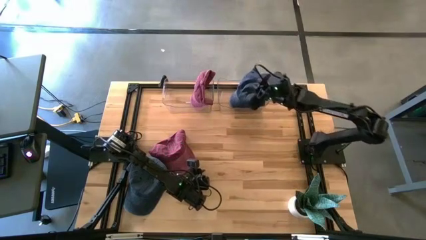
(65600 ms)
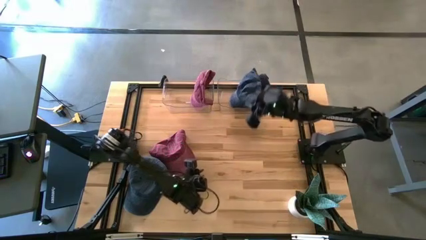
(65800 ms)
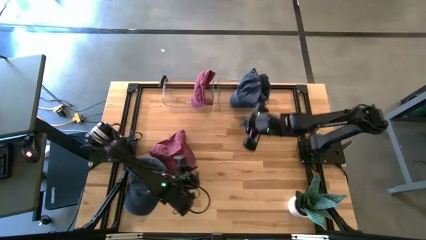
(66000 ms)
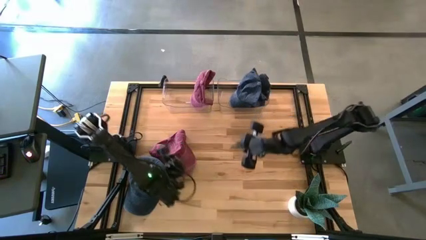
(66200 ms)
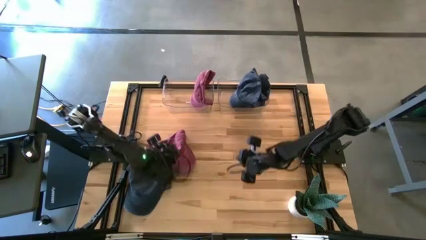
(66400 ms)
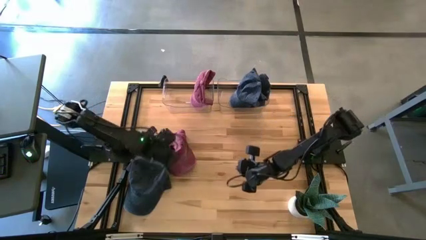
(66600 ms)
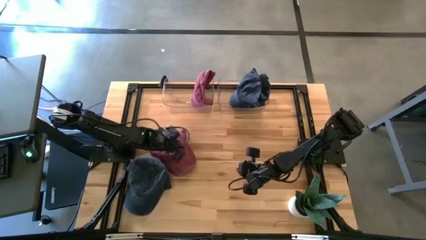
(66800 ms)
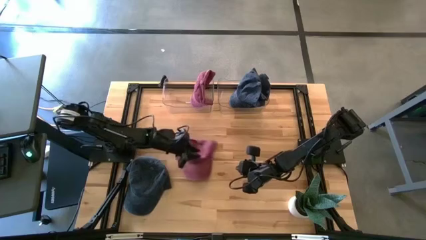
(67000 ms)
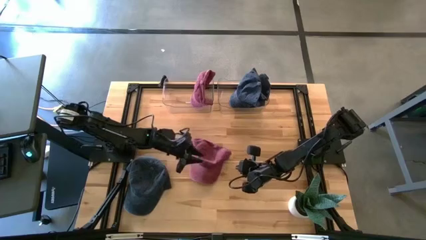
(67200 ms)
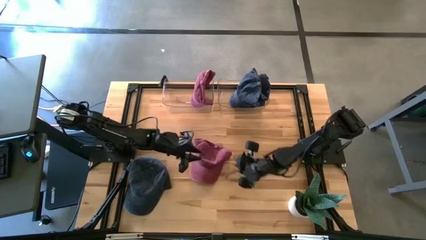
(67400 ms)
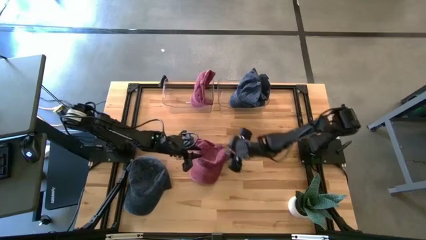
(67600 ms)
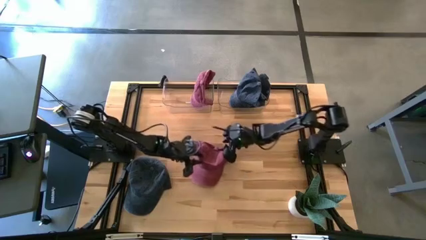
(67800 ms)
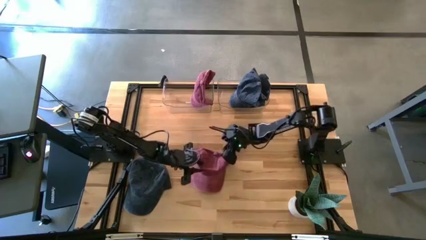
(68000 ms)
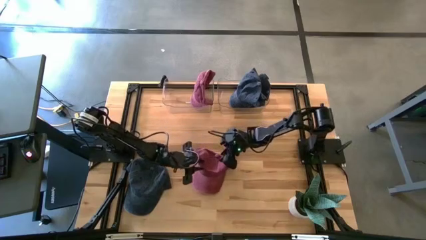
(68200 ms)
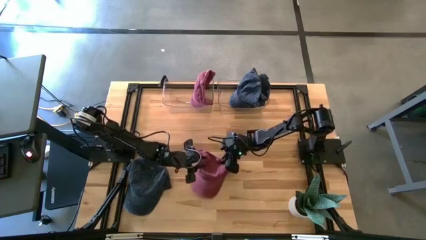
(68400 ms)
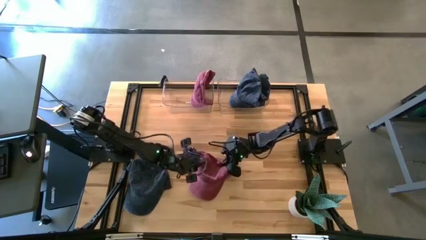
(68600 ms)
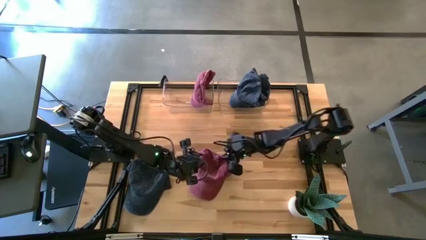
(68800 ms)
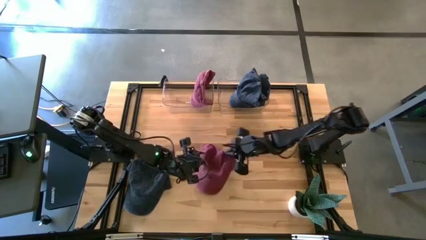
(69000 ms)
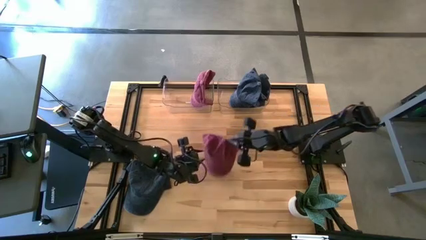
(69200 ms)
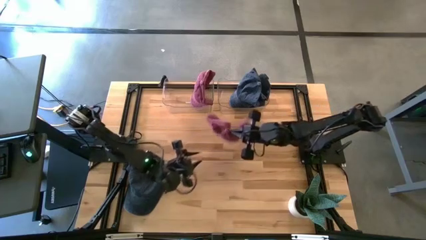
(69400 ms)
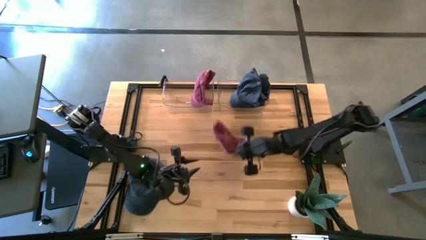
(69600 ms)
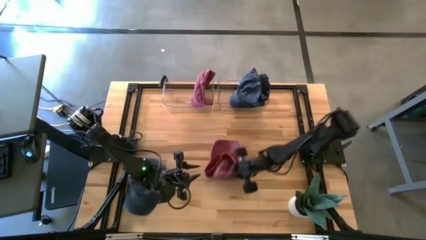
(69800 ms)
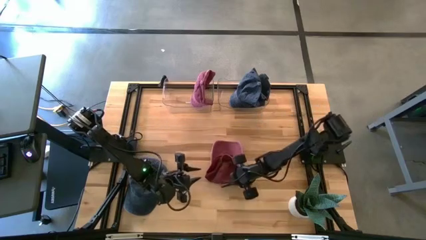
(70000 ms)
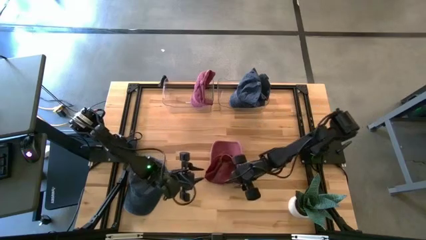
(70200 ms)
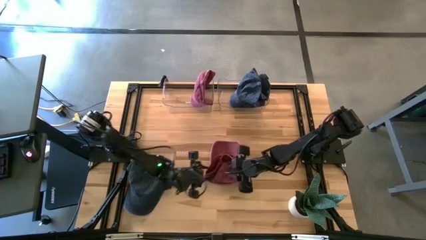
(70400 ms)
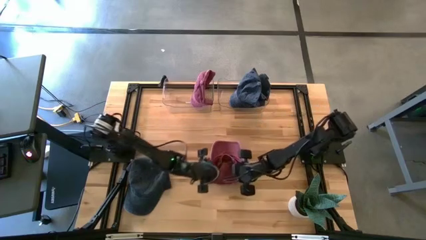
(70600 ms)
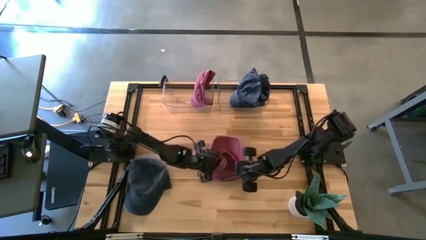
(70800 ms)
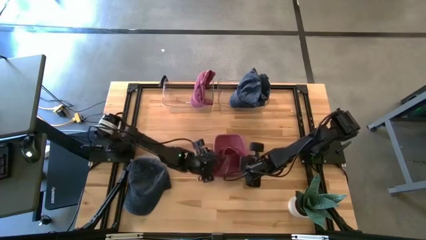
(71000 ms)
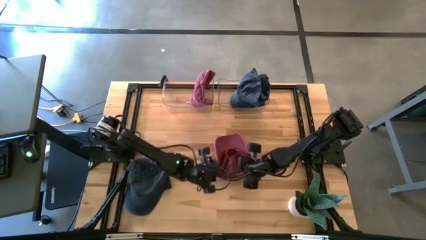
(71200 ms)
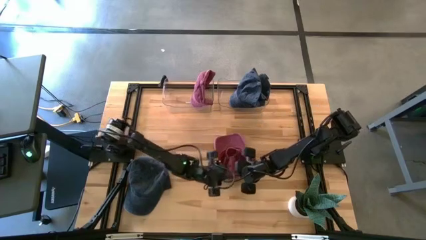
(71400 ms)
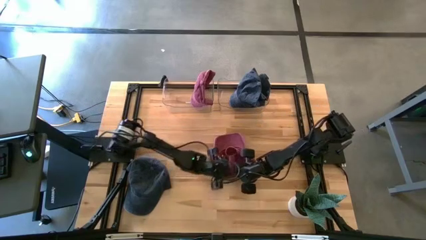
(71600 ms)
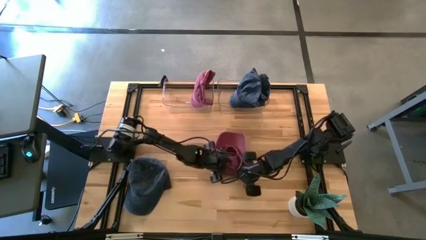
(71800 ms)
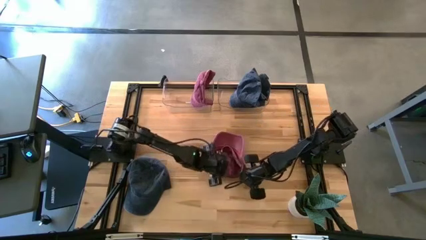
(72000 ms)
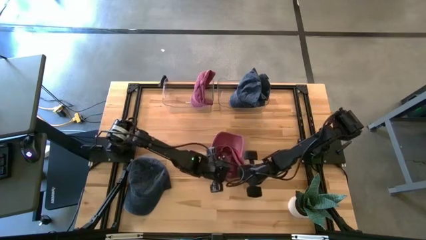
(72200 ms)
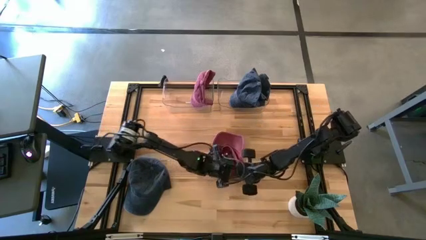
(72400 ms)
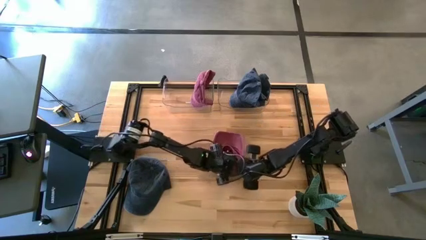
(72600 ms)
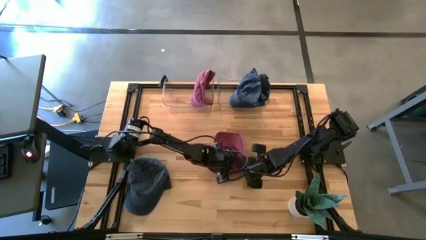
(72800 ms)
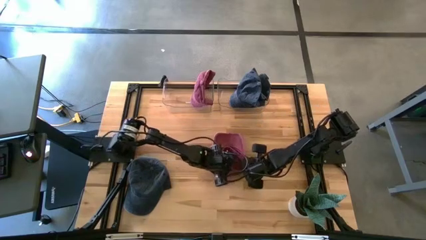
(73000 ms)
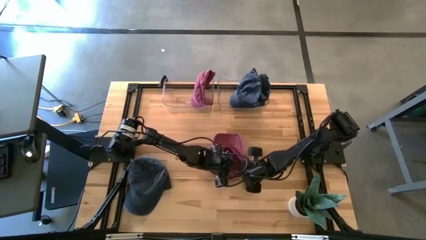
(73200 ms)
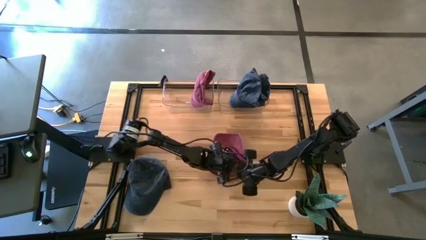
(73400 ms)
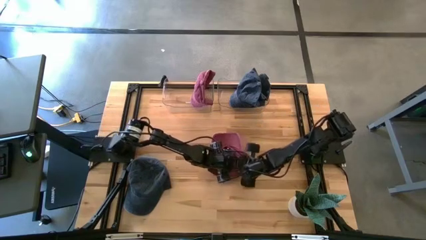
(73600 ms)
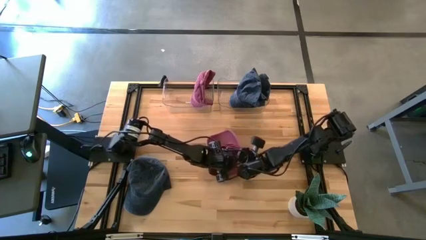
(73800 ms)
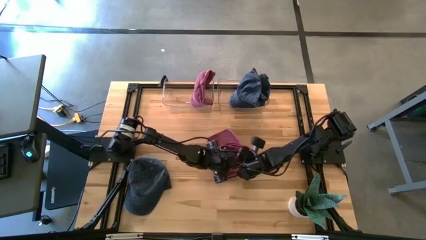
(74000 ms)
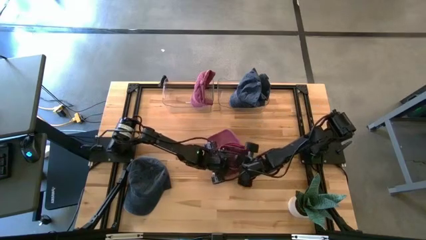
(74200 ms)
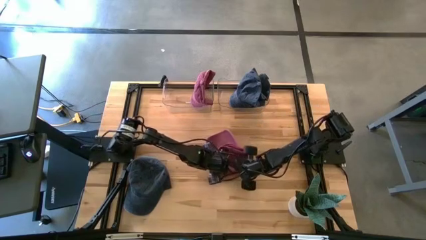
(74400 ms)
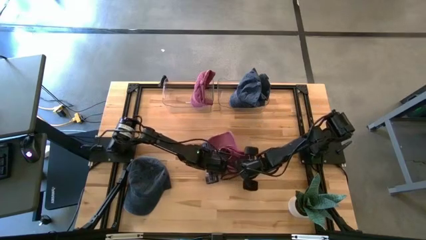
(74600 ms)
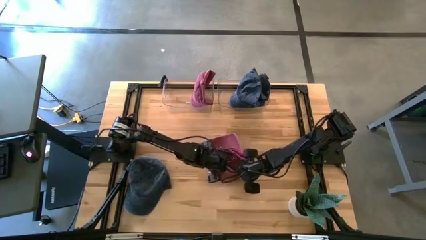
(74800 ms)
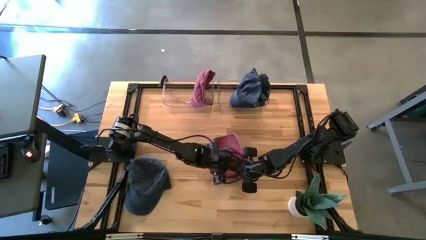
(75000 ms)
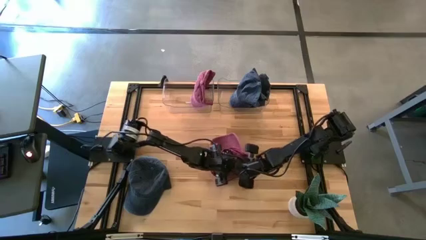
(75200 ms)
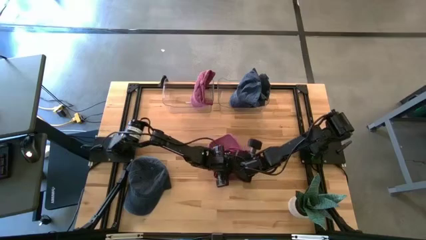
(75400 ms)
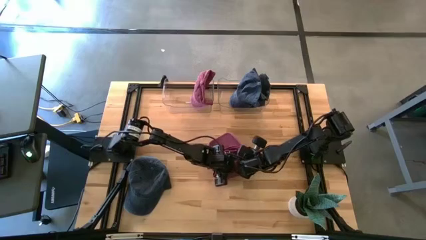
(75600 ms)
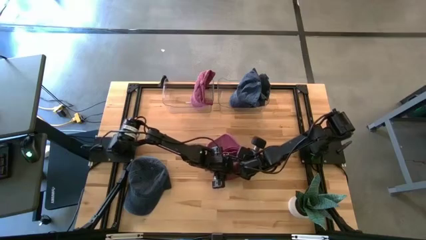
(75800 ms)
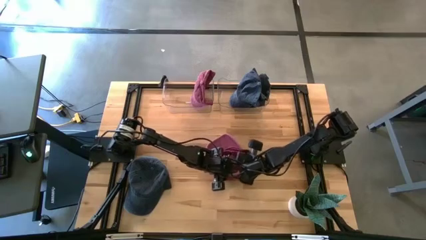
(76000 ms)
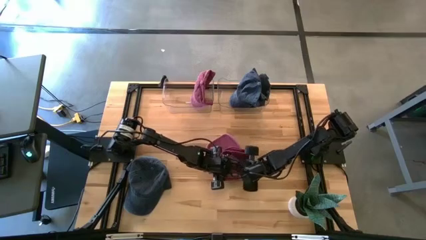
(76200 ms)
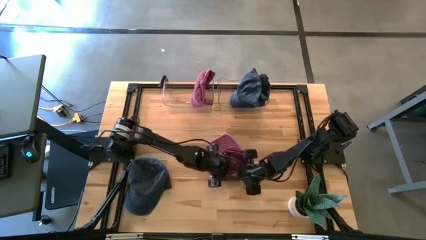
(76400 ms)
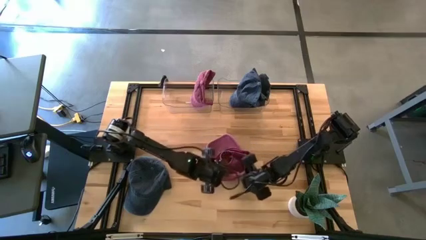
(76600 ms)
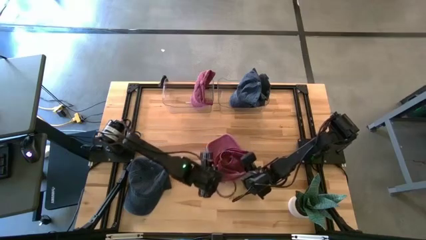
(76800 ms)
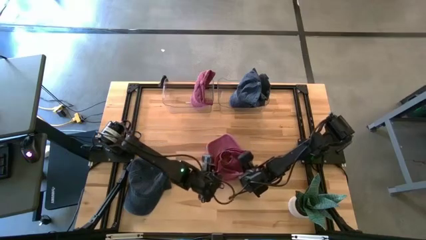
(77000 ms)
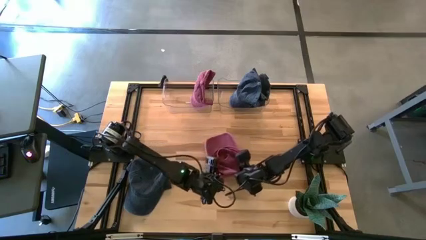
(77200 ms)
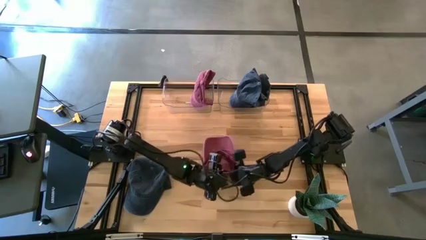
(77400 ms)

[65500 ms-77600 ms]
Task: Pick & Place hat
Put the red cap into the left transparent bin

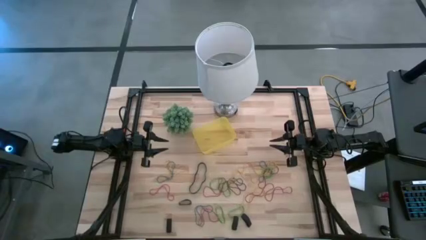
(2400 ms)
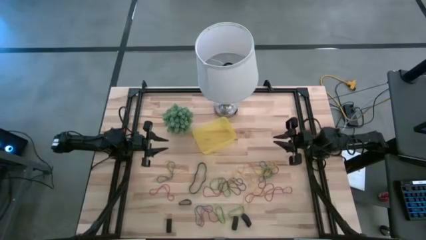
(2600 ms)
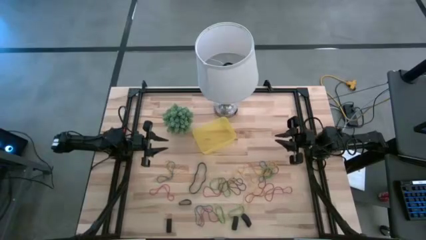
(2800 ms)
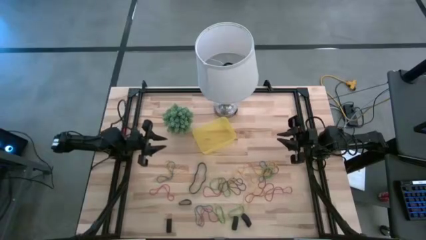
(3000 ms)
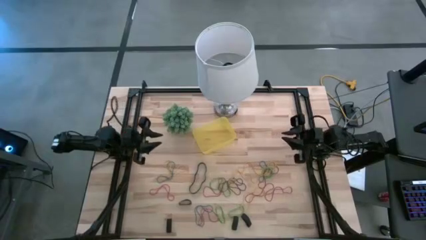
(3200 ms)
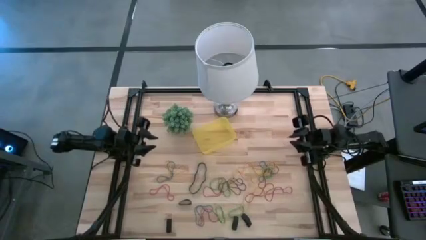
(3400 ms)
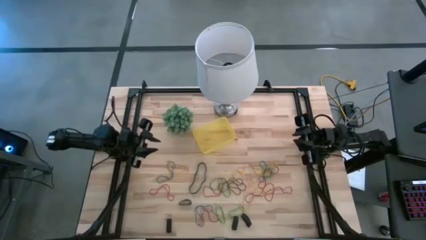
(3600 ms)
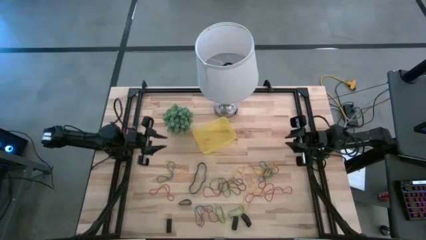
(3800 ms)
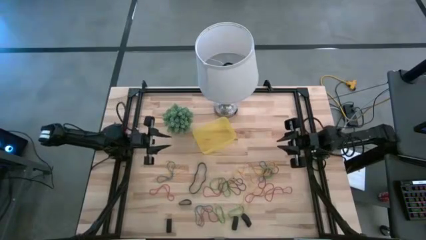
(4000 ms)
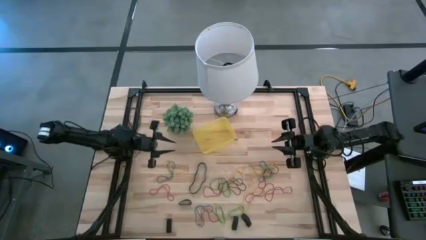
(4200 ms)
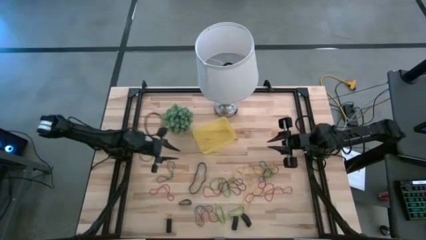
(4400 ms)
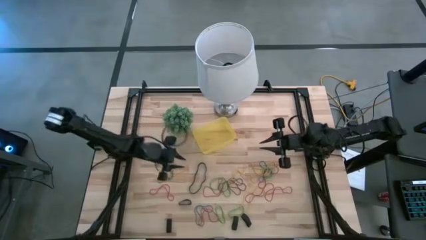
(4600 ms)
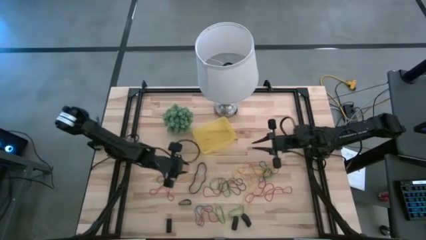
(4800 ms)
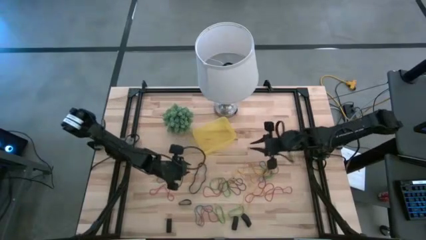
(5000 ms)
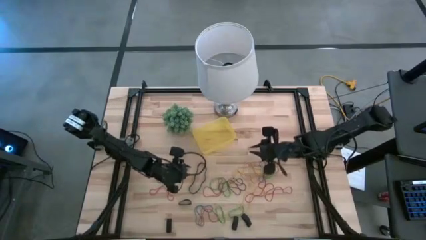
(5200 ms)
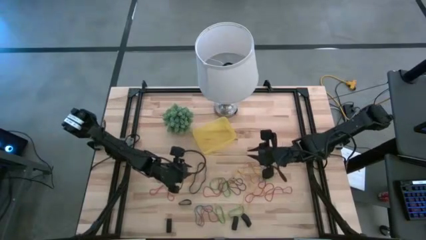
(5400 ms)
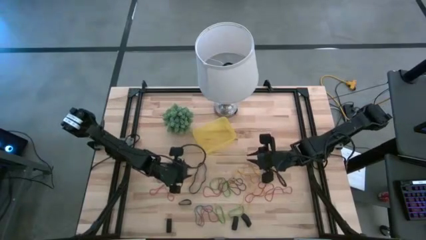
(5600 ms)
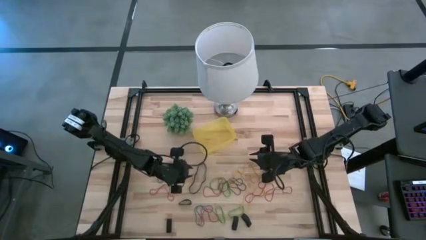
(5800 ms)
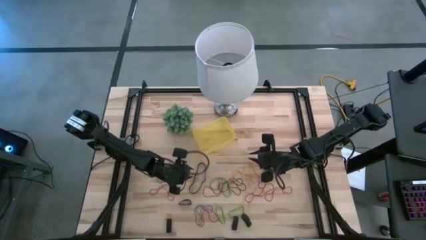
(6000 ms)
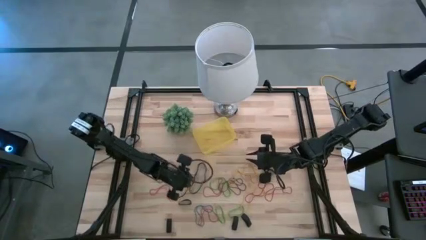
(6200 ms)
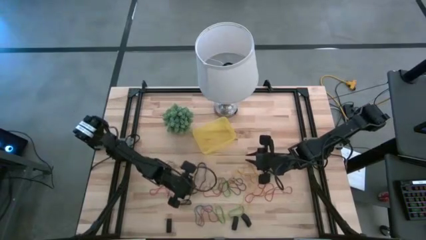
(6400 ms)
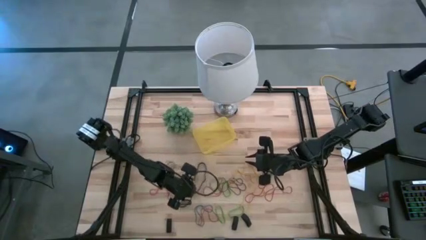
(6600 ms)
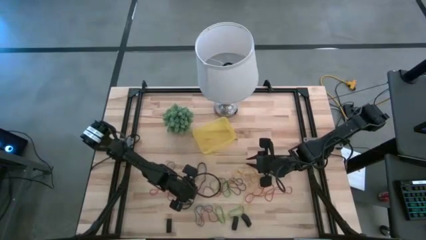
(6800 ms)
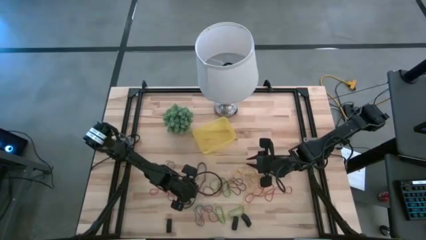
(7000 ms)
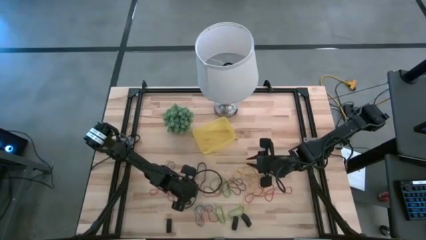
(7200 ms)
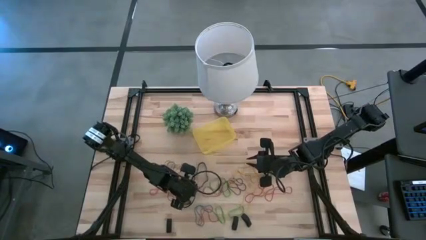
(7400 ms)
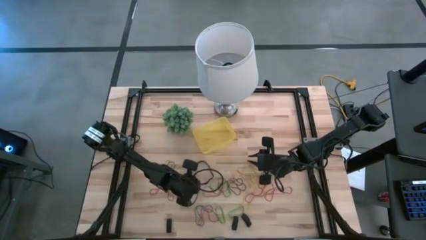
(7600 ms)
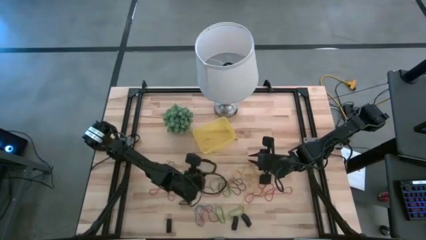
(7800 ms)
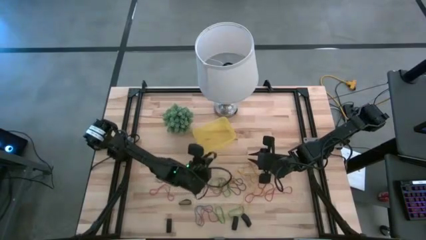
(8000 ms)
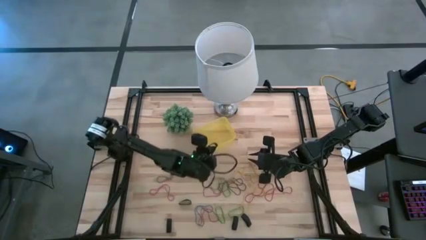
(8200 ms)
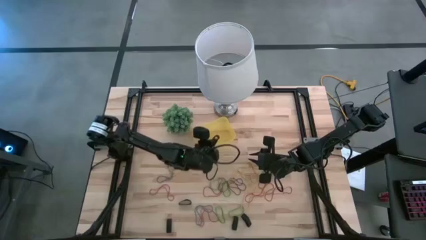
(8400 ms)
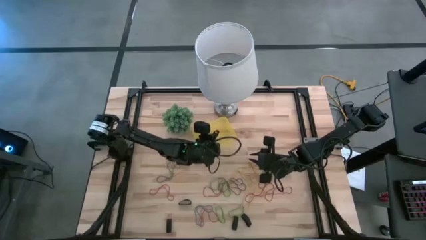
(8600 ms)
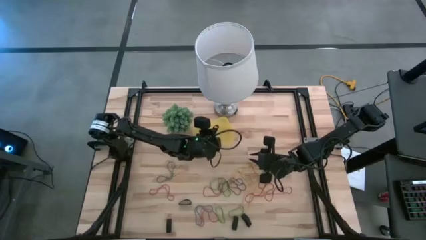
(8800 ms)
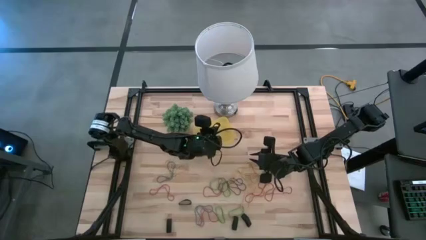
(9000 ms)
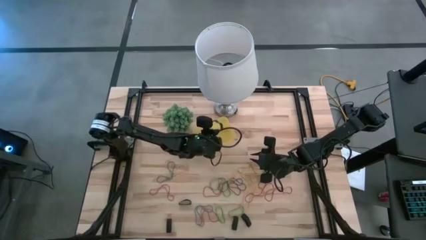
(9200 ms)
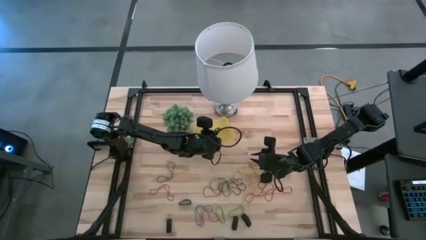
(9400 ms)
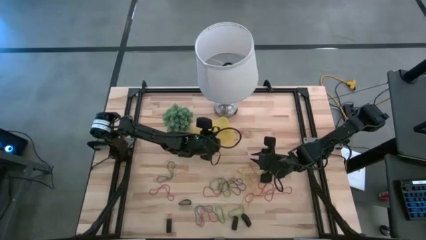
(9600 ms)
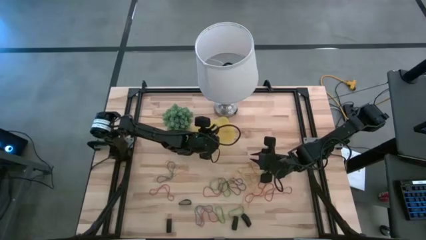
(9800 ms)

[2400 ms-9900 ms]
Task: Pick and place rubber bands into bin
Put the black rubber band into the yellow bin
